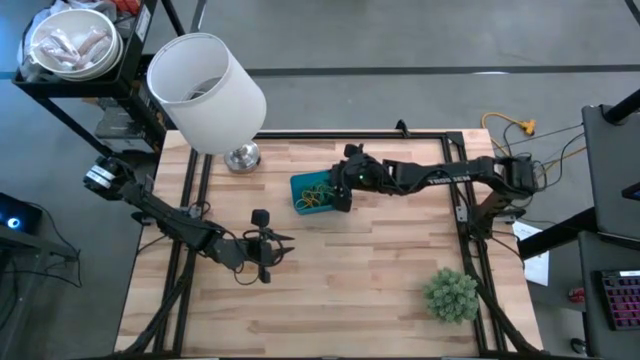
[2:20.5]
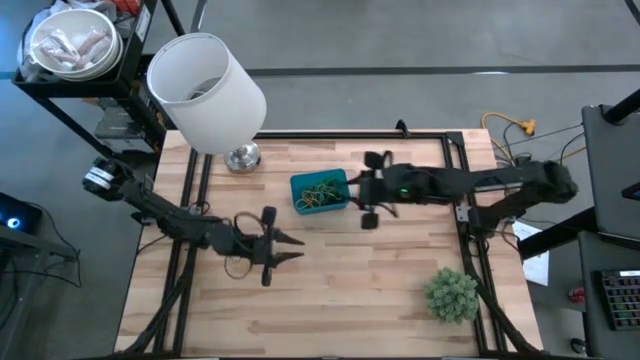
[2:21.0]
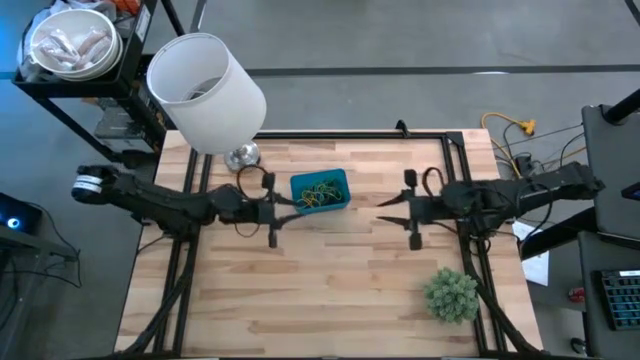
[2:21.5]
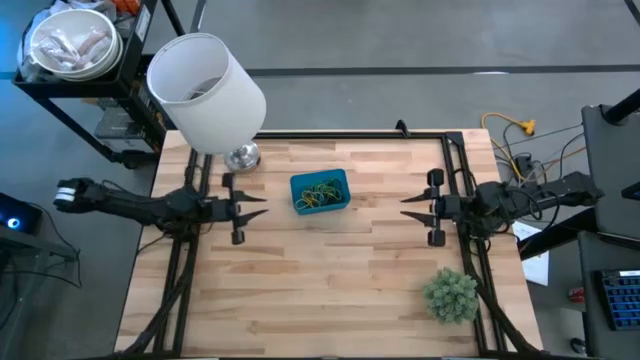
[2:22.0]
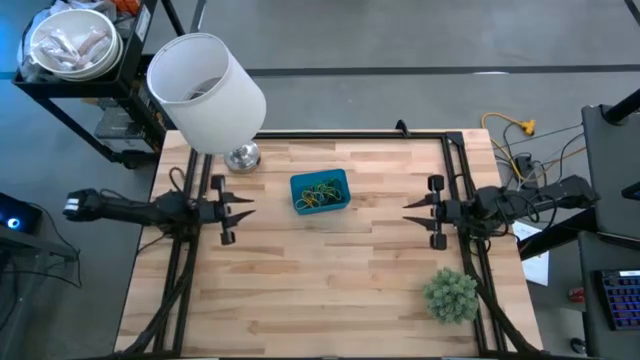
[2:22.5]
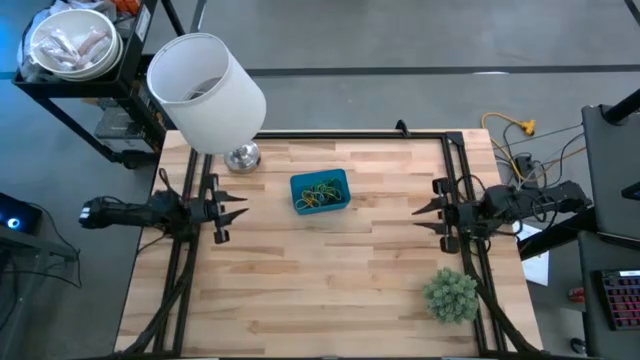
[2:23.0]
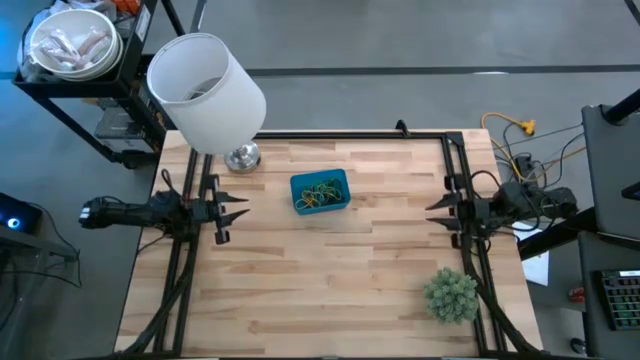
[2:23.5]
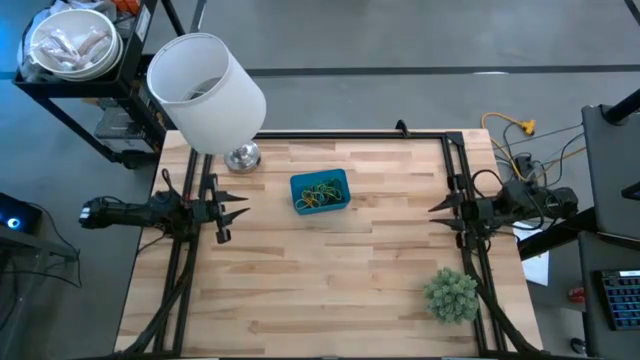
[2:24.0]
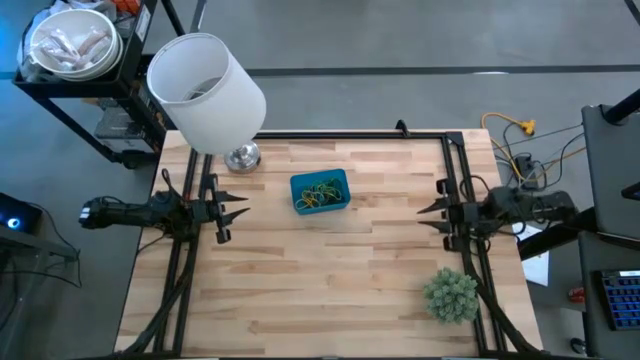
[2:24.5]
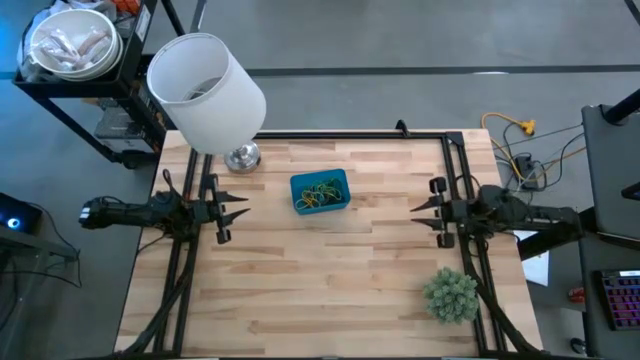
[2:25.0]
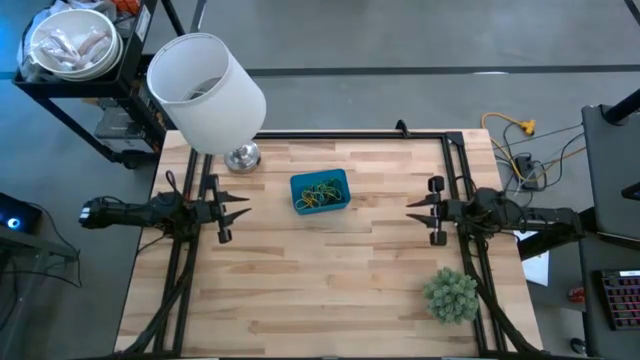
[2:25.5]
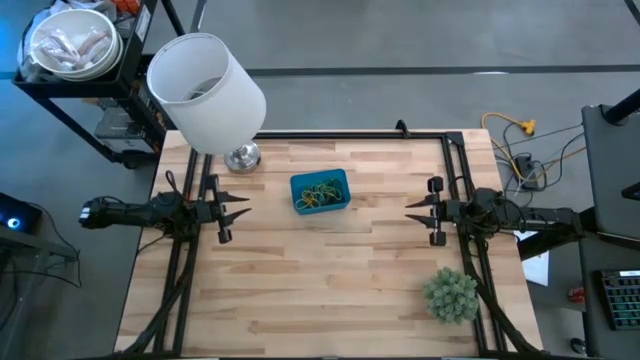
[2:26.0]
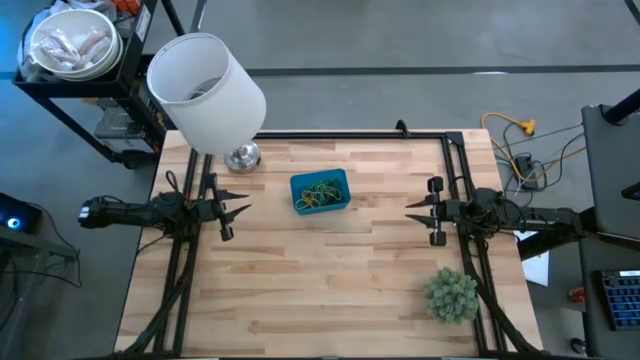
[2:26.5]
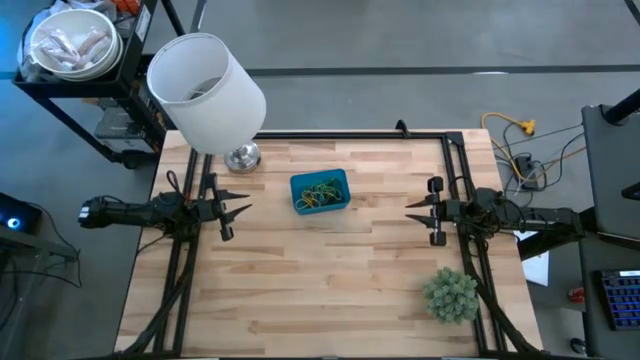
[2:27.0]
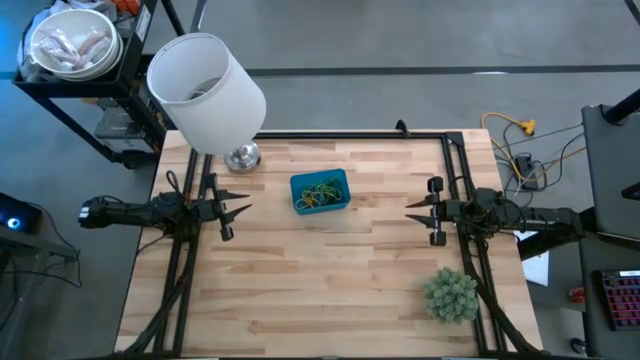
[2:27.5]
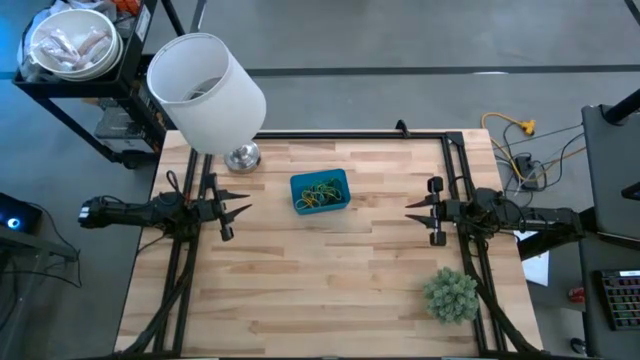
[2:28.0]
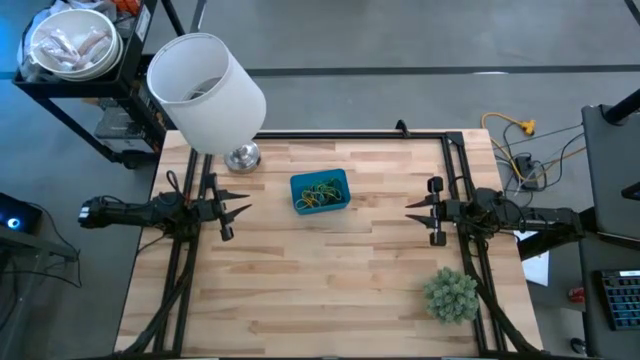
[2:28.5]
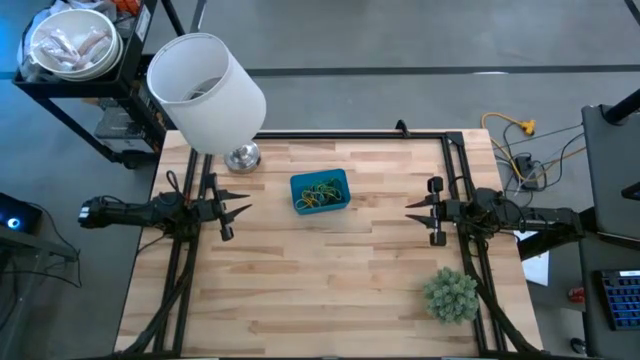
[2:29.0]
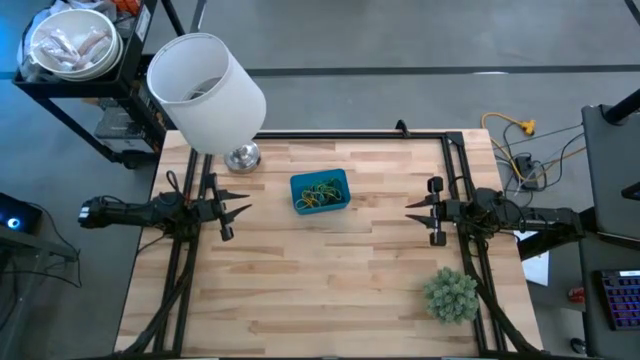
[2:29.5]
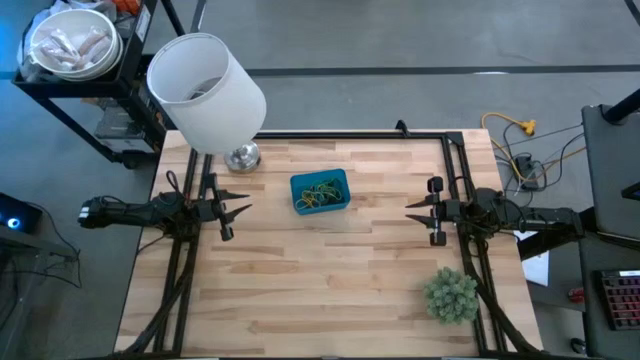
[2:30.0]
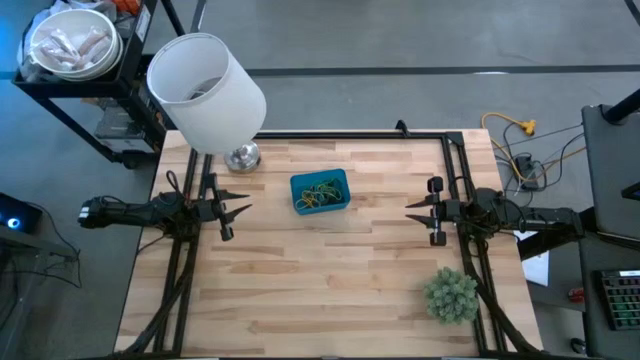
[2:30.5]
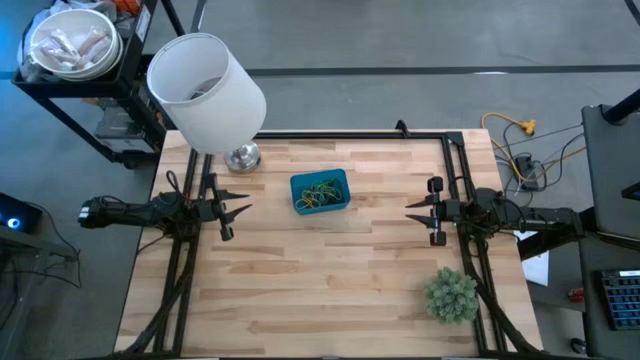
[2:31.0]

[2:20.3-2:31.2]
Task: Pick and place rubber bands into bin
Return to Home Position

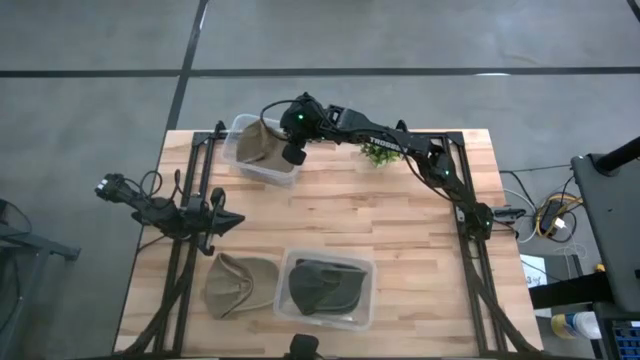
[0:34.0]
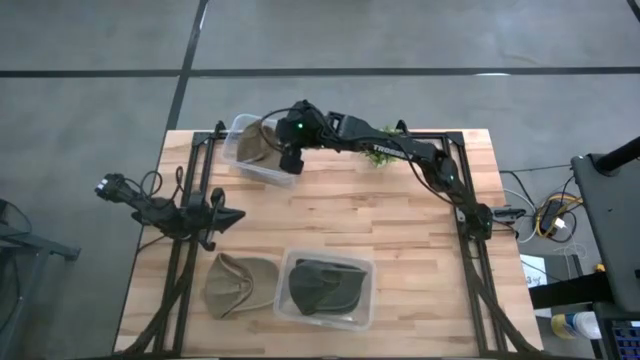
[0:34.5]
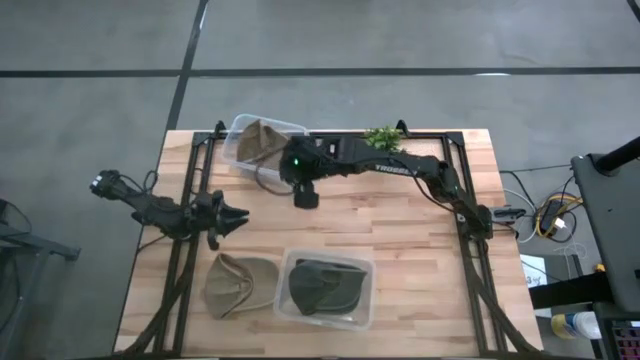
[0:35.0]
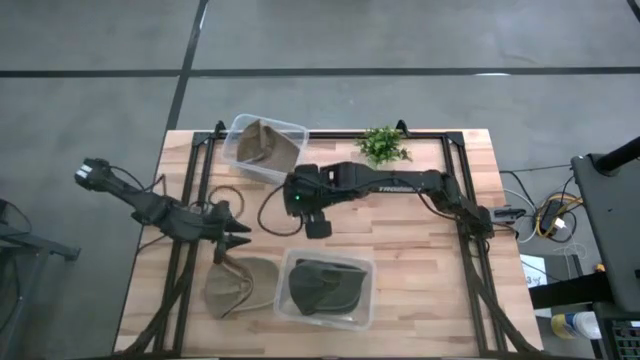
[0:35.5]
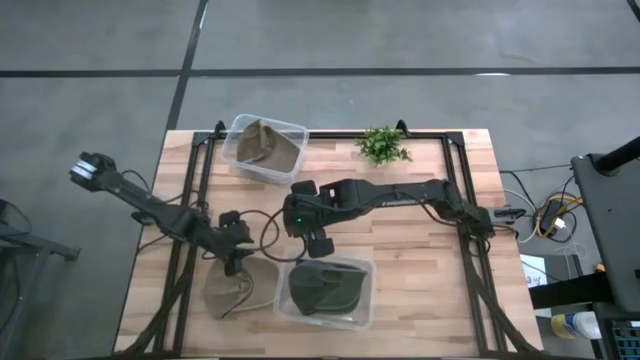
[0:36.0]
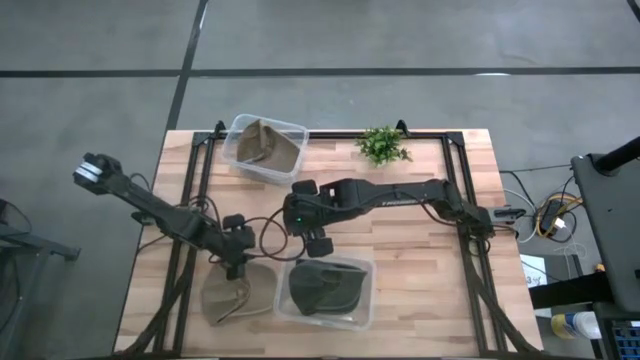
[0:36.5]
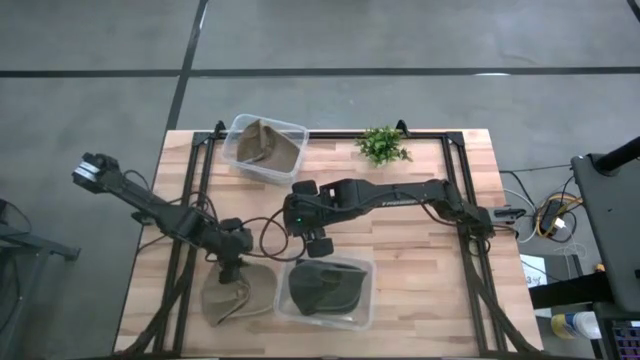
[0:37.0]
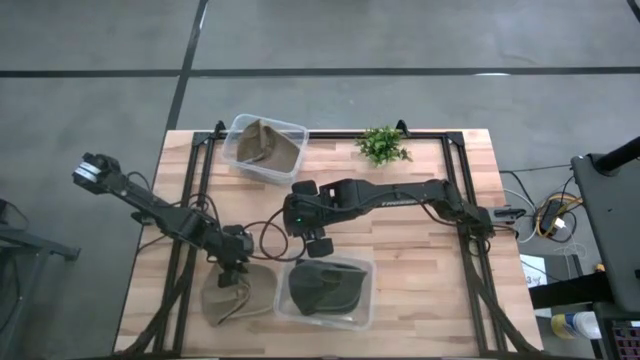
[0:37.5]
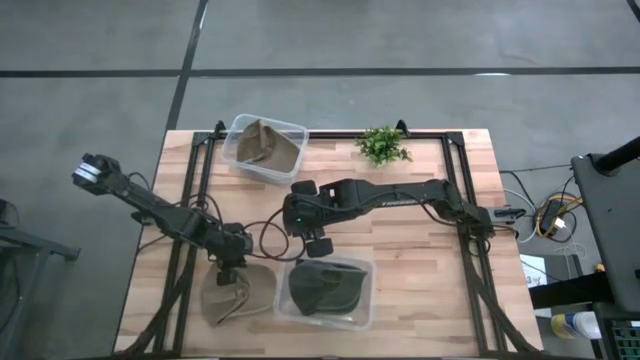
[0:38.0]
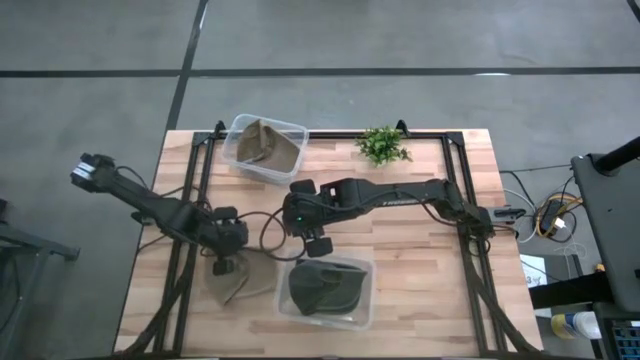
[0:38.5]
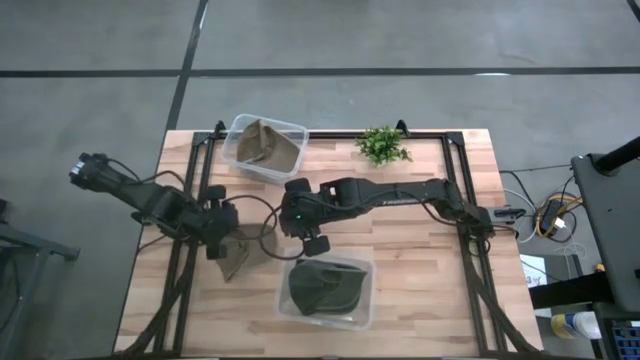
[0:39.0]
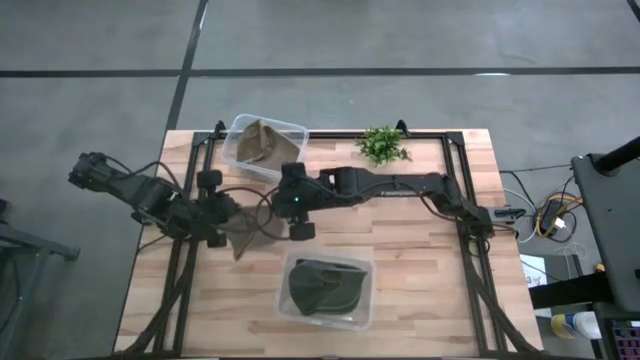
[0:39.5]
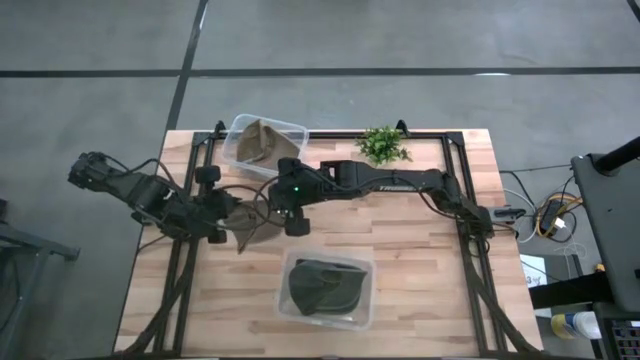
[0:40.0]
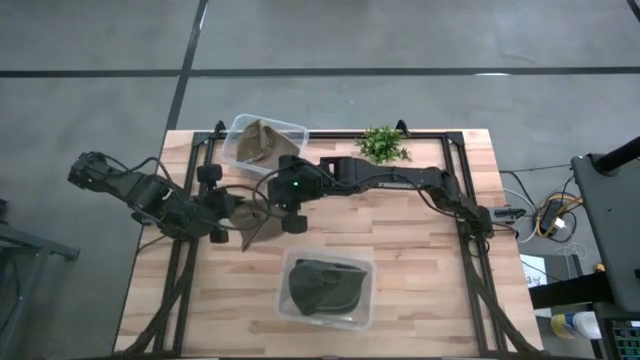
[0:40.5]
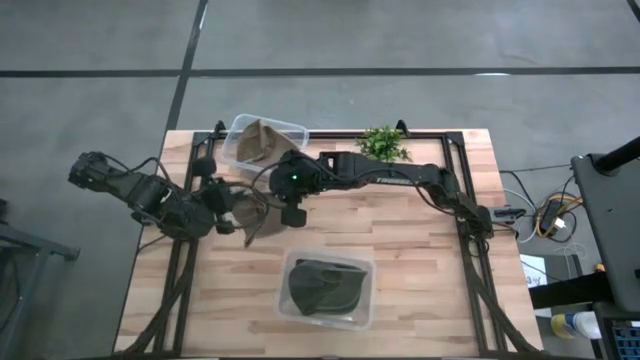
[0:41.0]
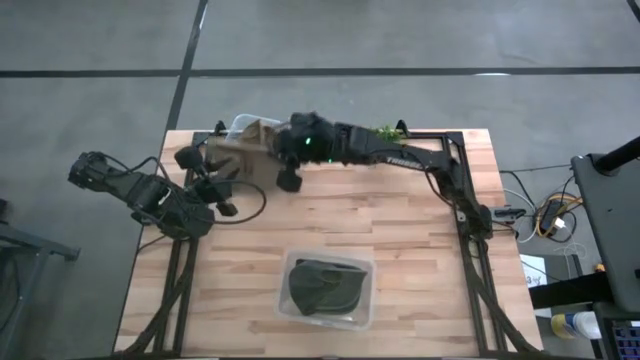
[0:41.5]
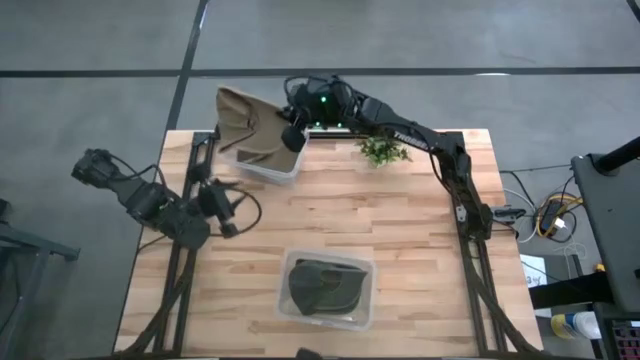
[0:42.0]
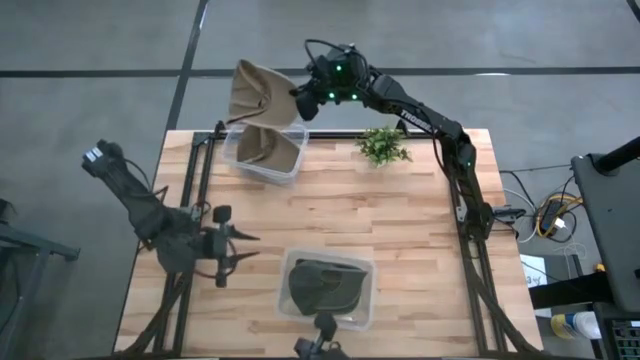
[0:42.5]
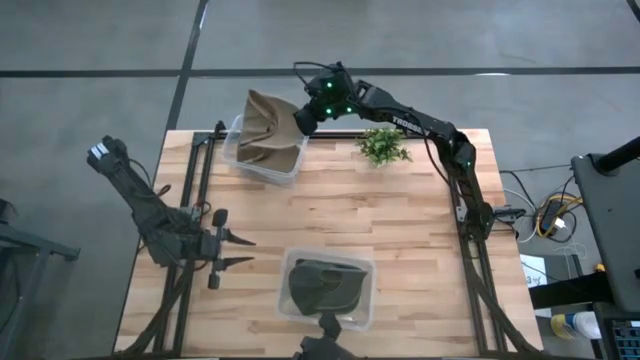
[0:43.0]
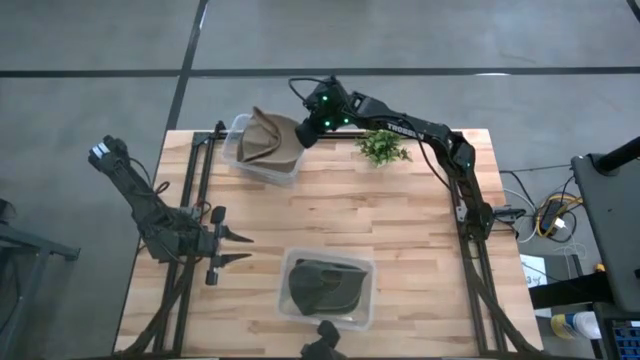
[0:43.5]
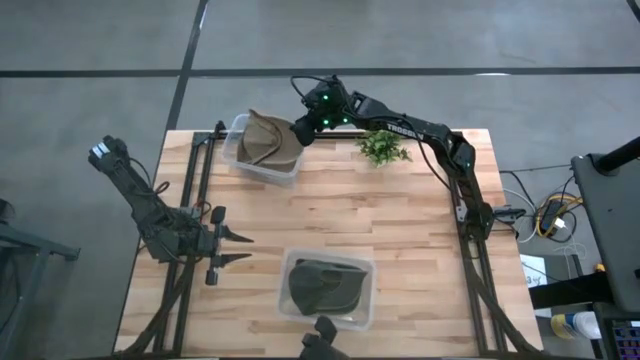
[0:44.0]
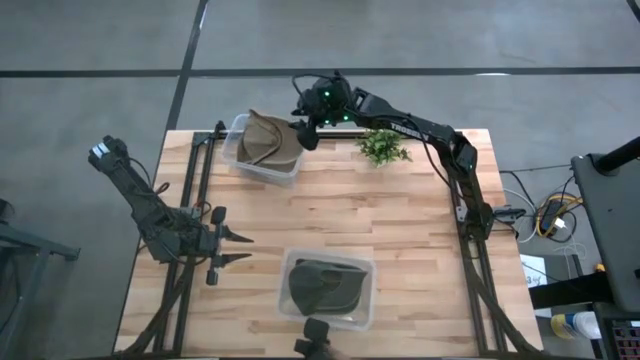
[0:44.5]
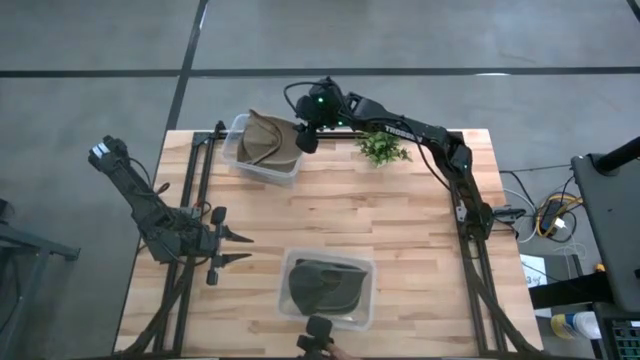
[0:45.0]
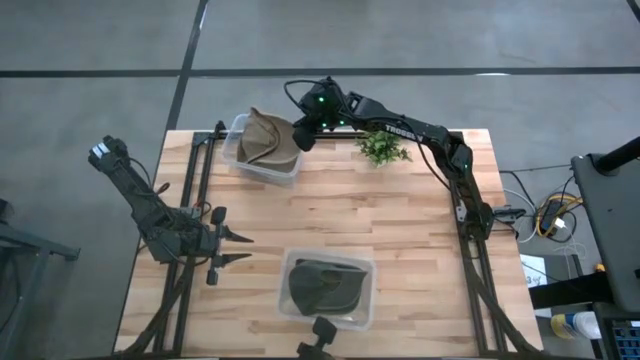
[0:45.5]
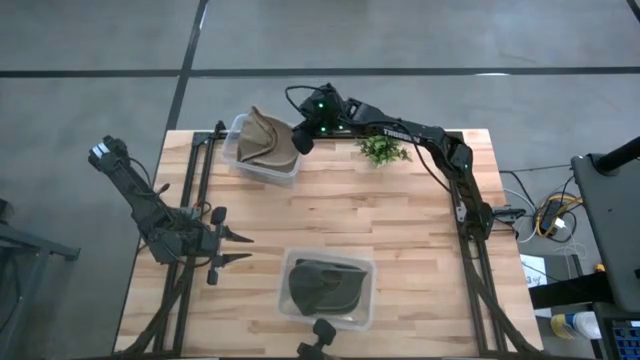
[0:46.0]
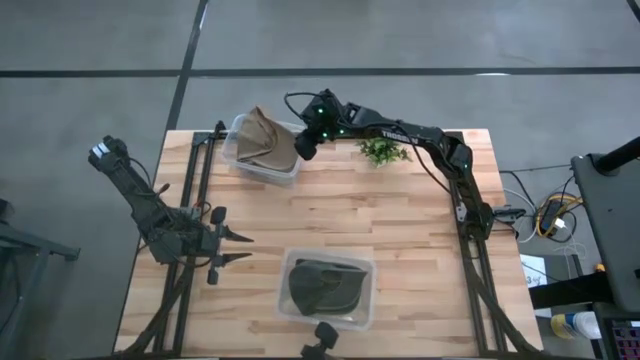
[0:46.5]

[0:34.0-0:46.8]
Task: Pick & Place hat
Put the brown cap into the top transparent bin
